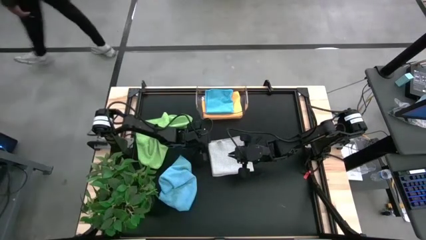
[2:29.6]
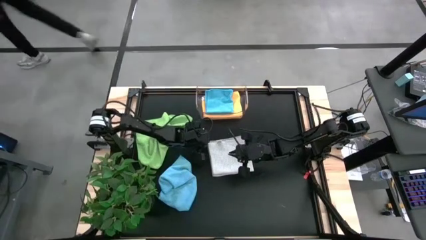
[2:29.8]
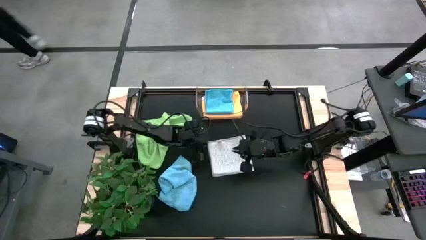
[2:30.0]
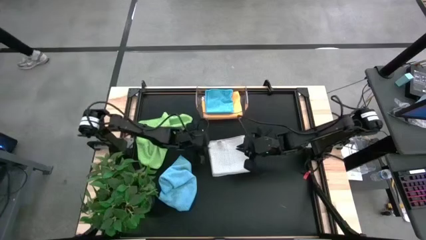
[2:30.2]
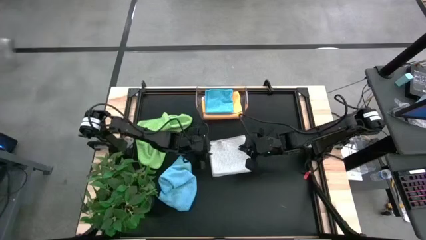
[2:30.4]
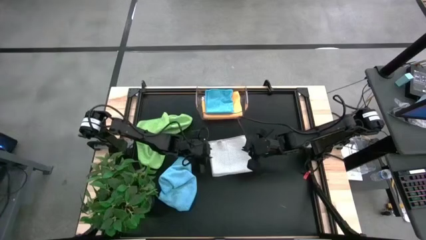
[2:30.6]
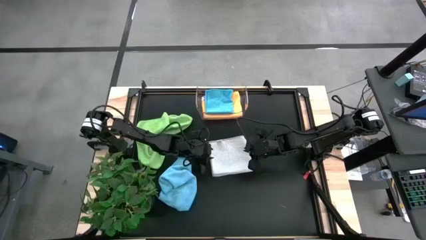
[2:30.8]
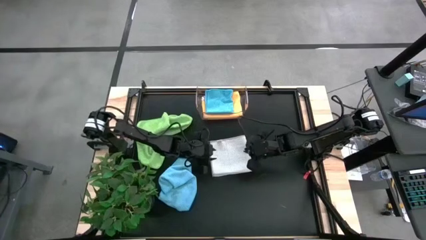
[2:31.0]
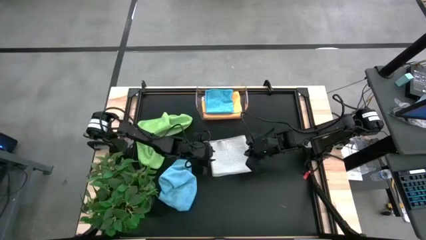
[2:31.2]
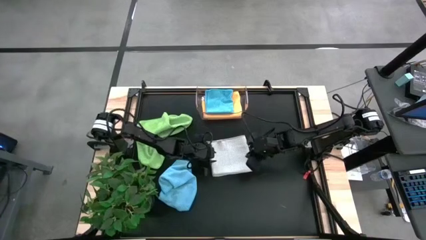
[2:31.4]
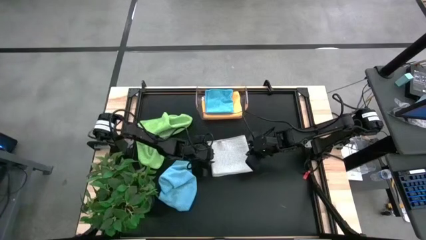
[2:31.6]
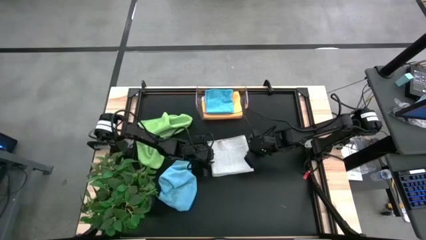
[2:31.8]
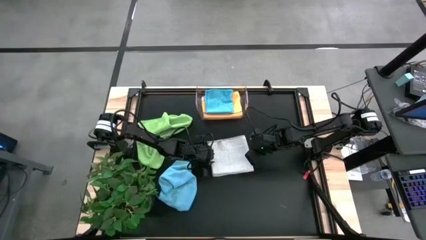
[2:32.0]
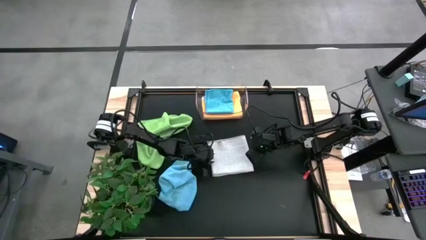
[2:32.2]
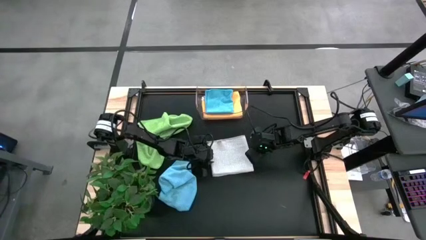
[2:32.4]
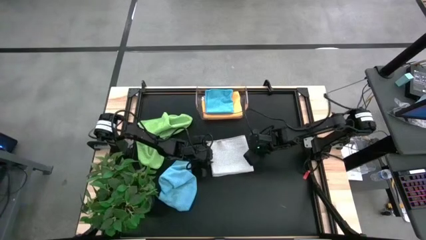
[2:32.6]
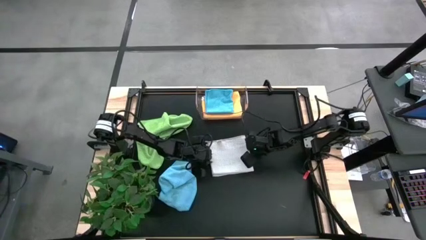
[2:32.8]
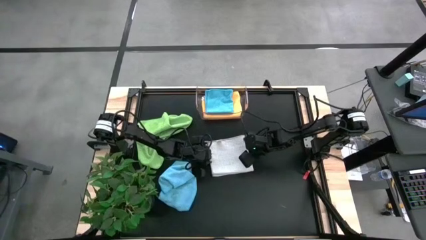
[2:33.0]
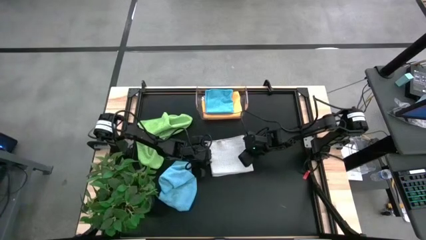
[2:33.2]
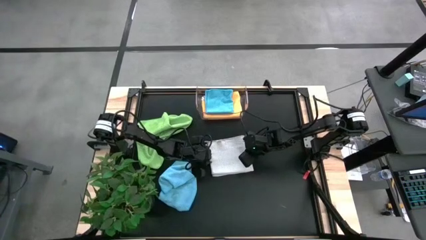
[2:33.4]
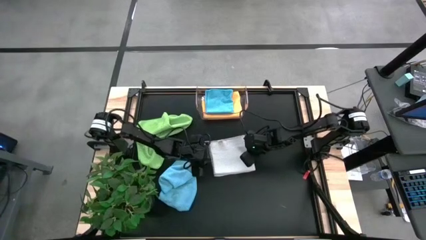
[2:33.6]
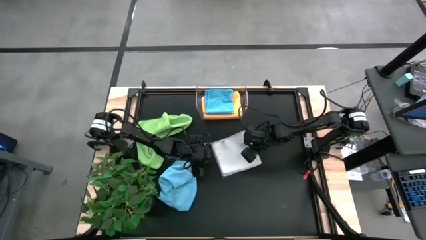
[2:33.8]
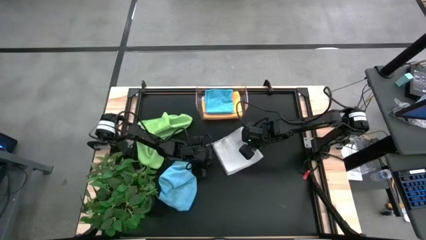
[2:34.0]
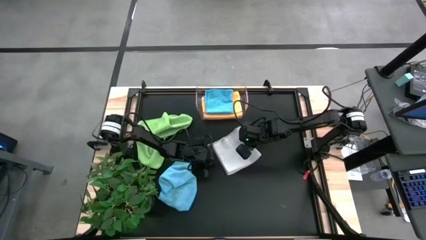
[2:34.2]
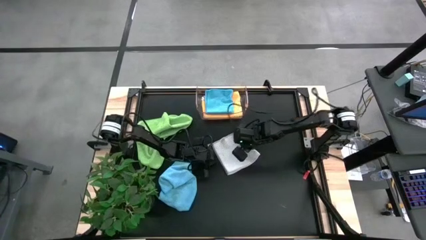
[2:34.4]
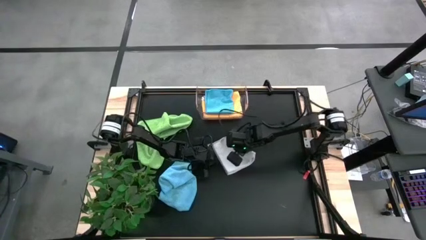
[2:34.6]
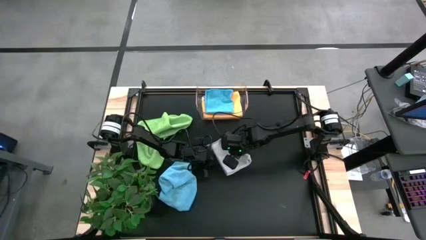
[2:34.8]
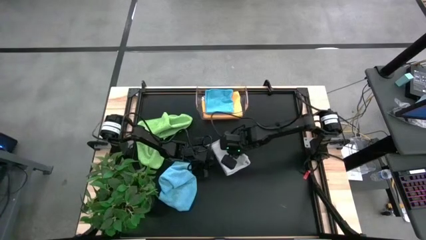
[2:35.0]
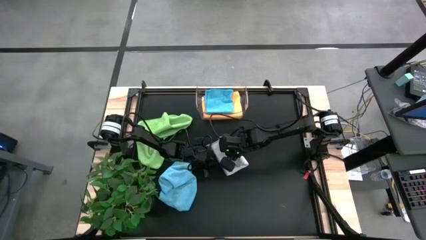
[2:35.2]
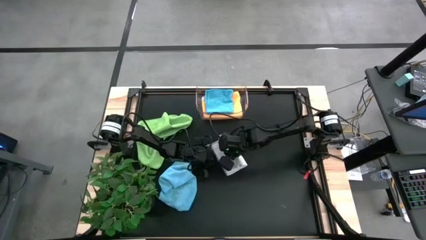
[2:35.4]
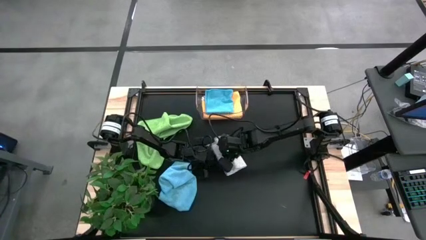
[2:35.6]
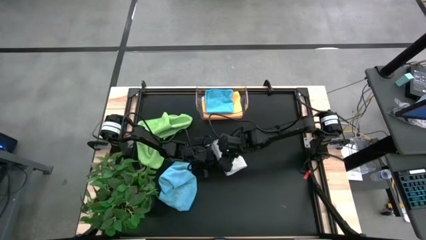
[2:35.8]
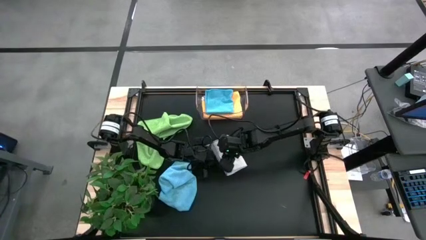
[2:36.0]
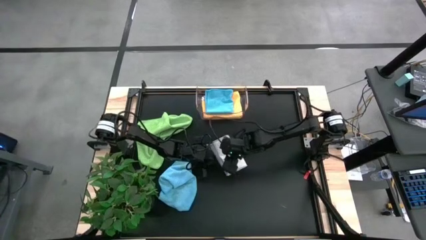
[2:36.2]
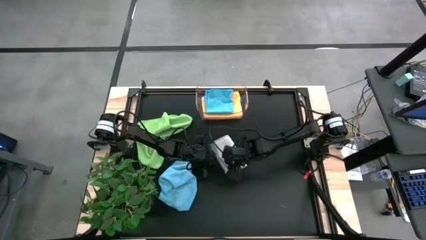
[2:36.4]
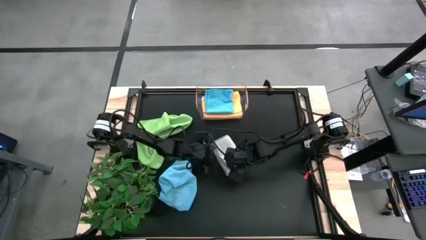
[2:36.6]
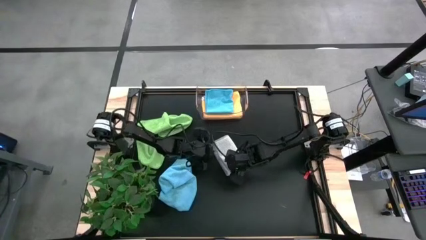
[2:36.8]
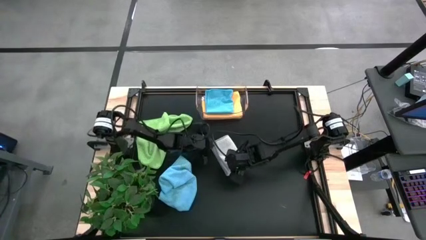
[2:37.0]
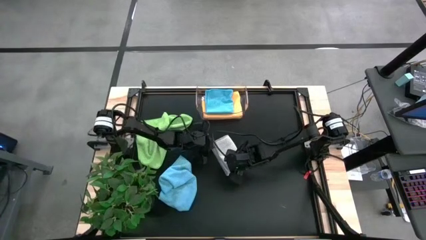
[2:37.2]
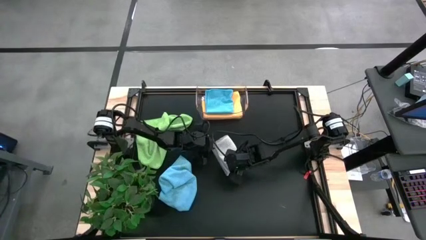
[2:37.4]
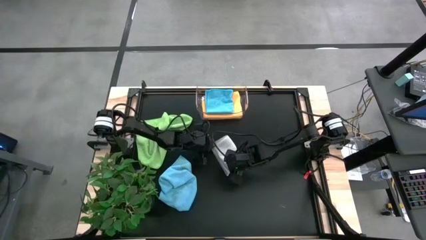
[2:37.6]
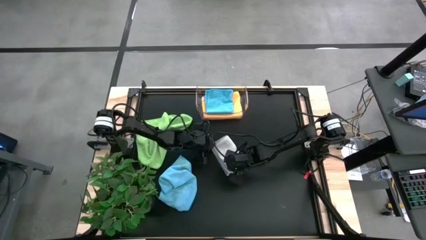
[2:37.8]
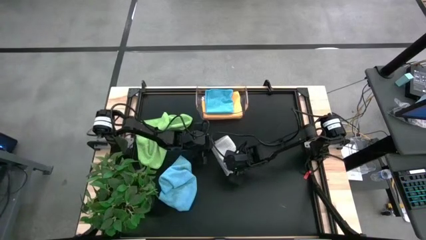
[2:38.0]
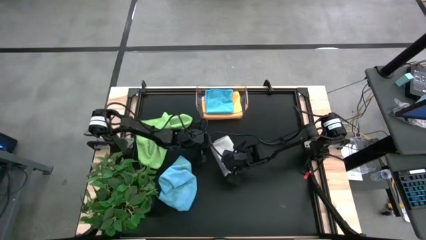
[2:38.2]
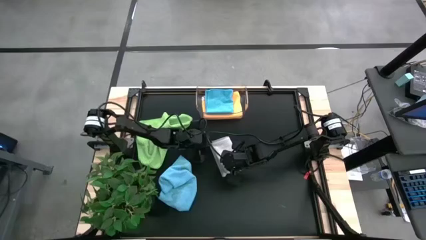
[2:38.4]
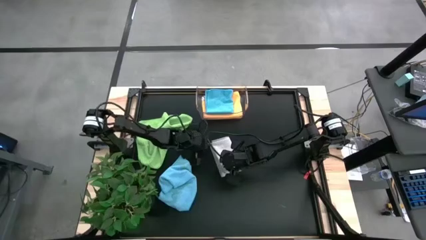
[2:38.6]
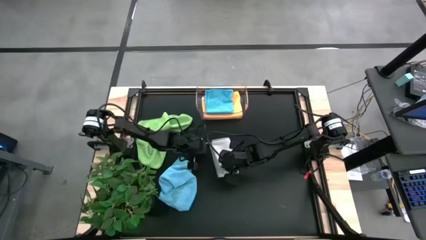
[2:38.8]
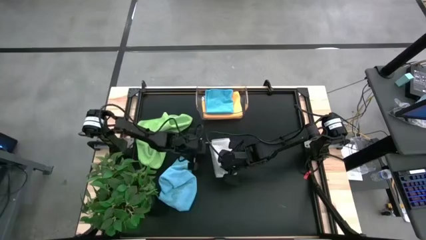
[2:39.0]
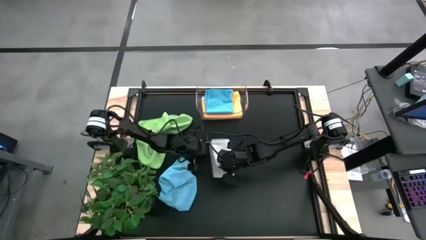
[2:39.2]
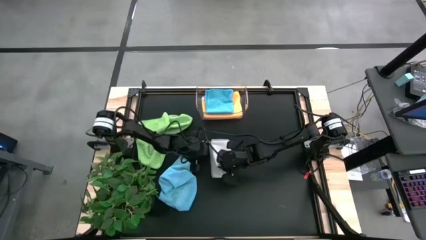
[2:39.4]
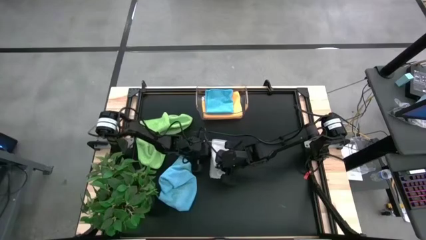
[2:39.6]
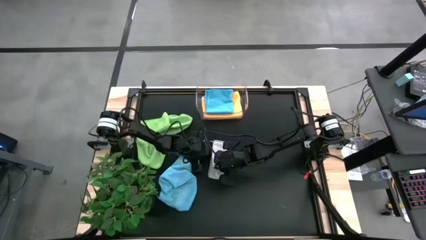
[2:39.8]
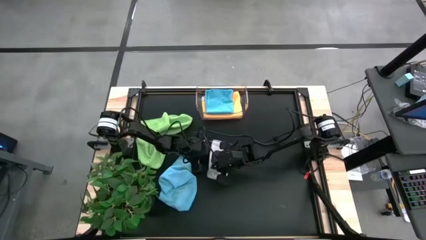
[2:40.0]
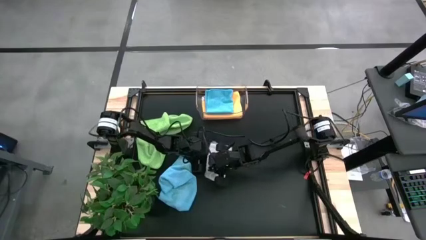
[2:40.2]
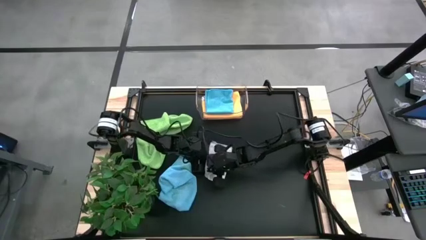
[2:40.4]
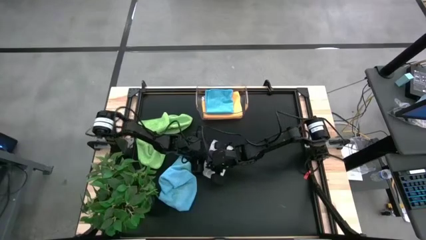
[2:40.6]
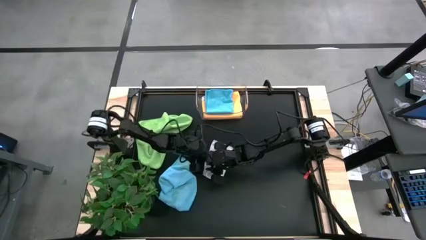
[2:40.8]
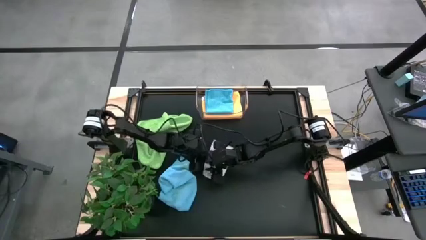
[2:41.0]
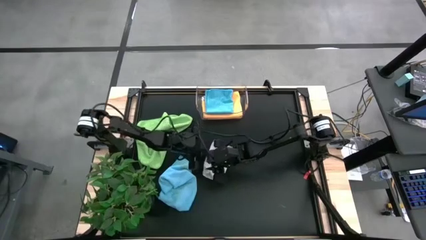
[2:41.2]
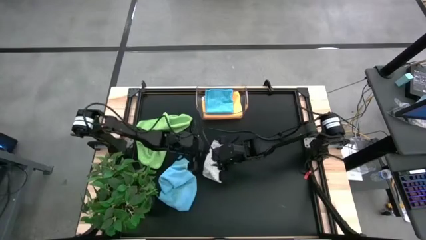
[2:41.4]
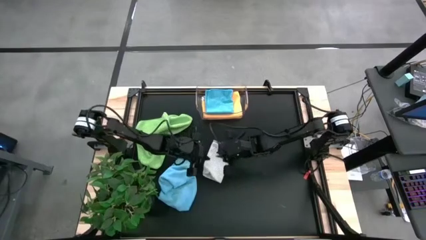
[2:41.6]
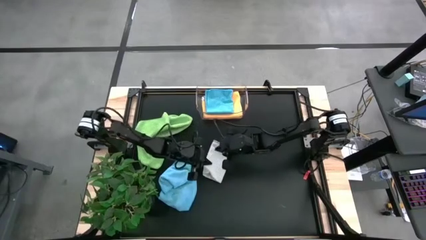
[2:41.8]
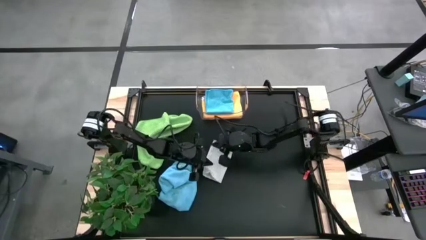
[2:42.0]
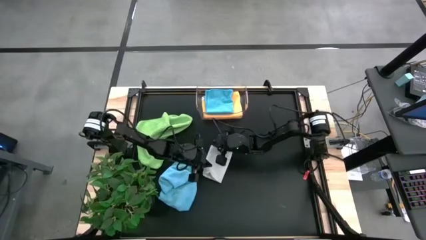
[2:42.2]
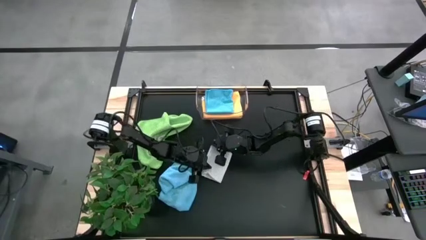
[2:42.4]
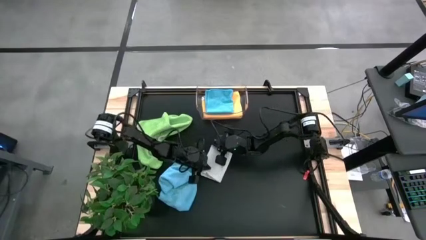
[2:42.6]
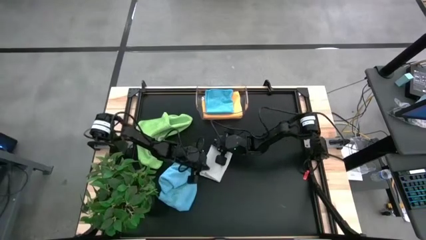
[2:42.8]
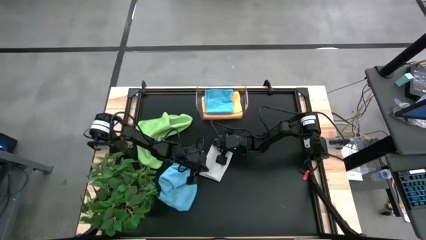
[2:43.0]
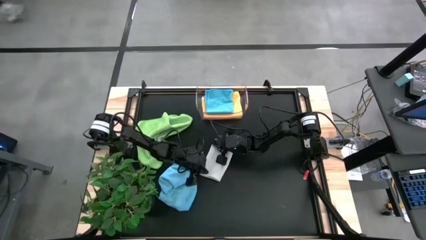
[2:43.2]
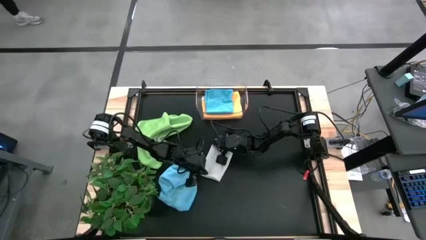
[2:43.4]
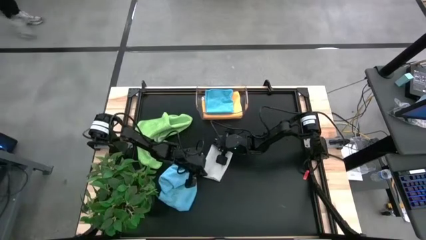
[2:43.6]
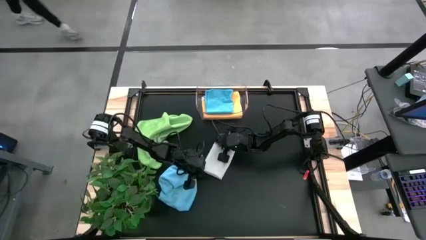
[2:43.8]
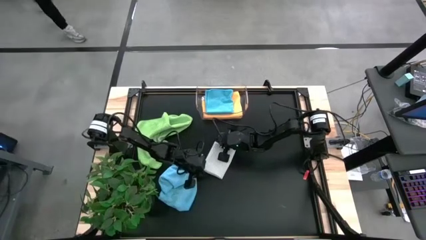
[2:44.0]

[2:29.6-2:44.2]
Task: Fold microfiber towels
Fold the gray microfiber cloth

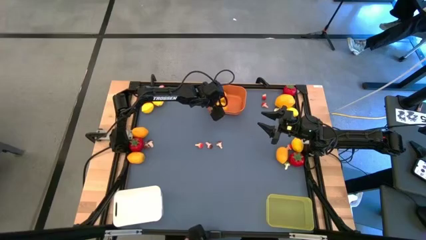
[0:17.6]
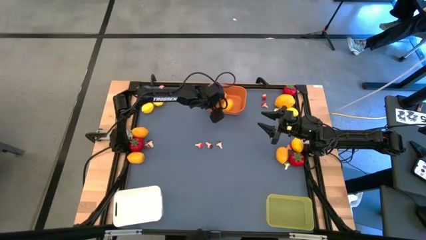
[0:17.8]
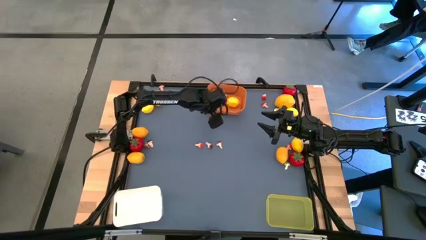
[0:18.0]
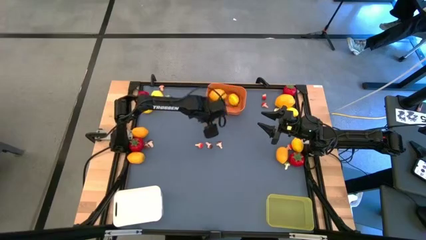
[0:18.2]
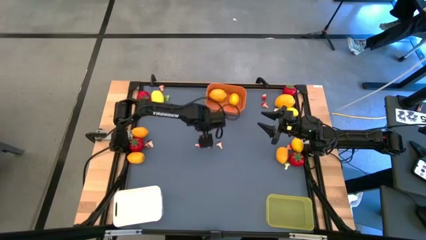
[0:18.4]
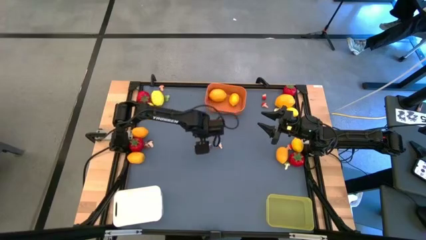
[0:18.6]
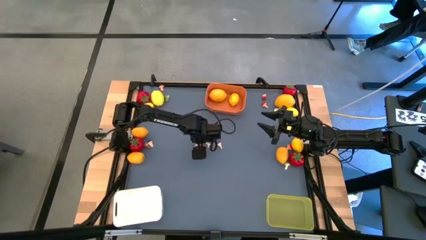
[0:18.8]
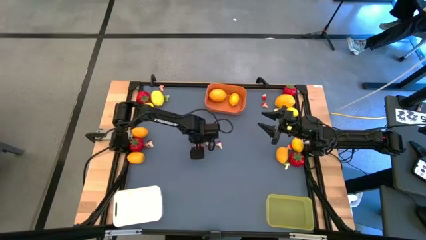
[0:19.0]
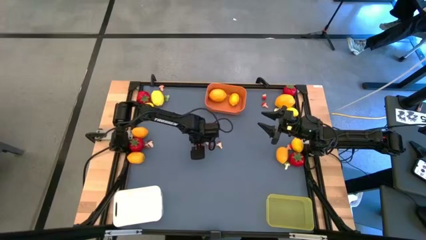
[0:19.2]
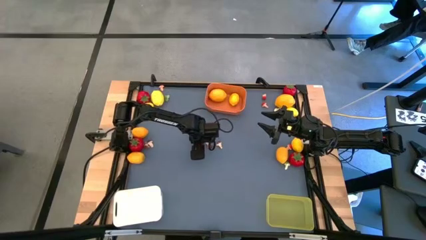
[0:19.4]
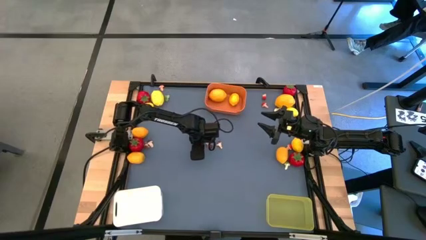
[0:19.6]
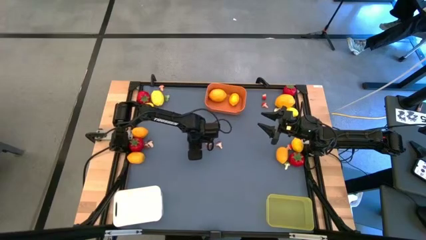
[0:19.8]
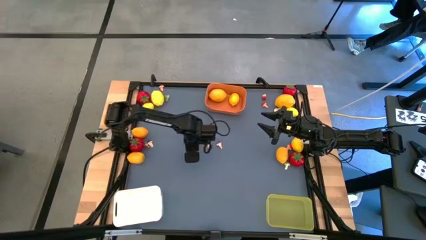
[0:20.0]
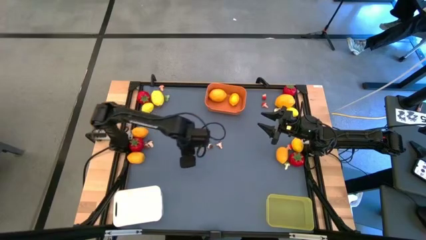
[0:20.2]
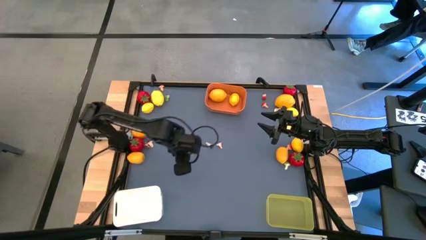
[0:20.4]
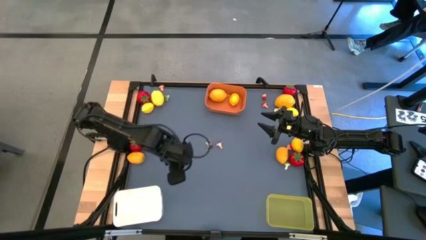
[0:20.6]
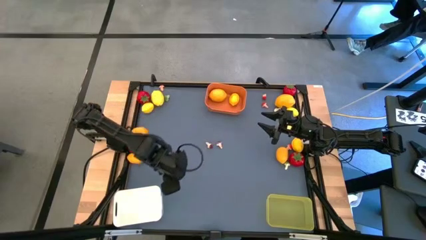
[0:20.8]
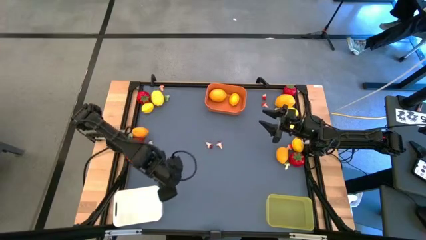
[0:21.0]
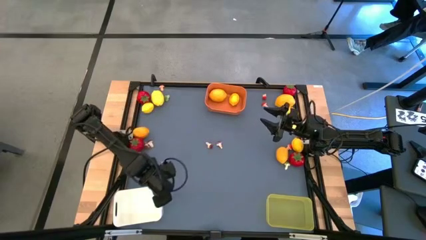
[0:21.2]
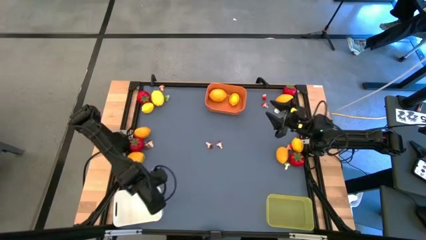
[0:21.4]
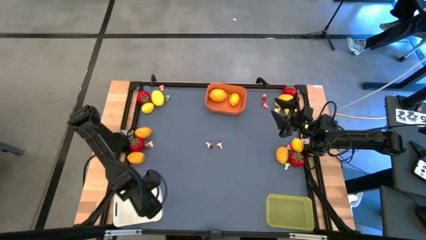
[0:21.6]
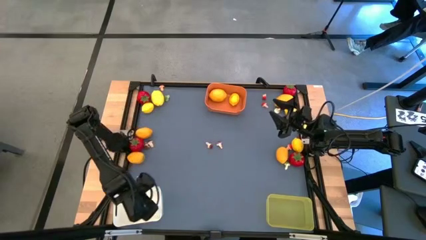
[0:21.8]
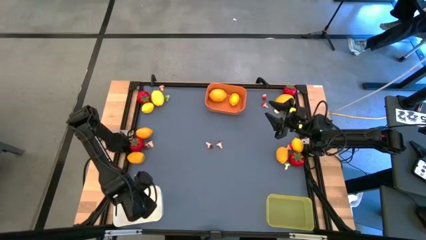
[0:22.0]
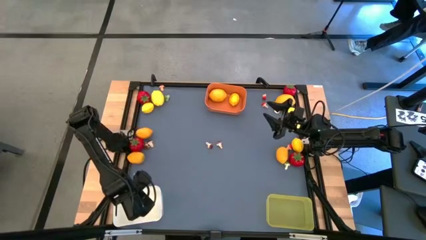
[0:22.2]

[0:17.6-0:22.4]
Task: Sort produce into baskets
Put the red mushroom into the white bin
